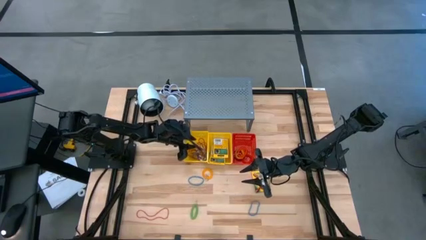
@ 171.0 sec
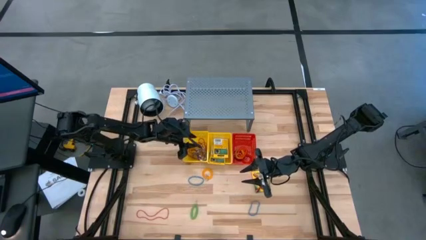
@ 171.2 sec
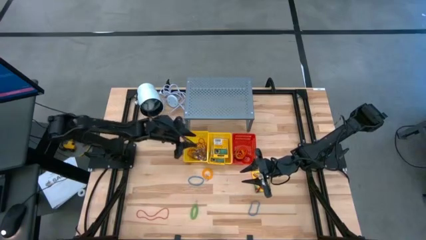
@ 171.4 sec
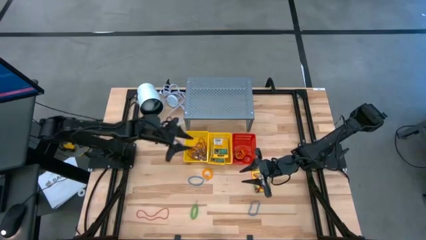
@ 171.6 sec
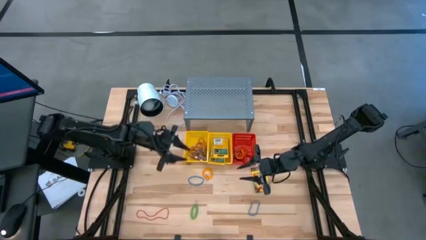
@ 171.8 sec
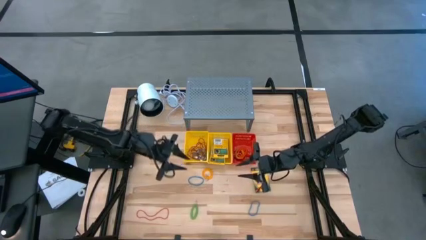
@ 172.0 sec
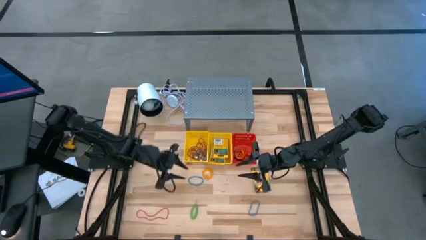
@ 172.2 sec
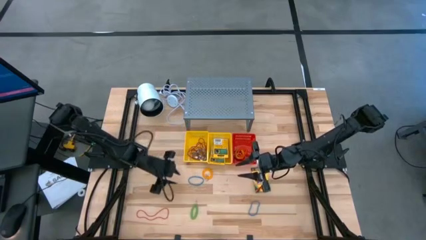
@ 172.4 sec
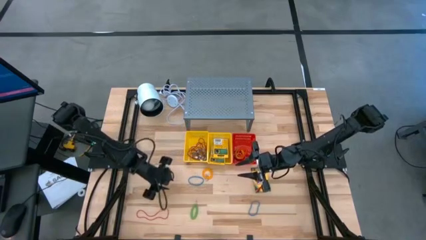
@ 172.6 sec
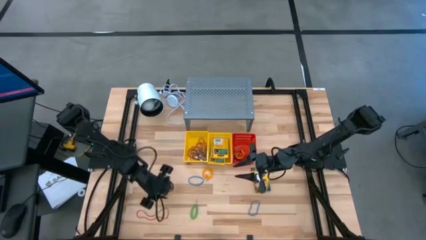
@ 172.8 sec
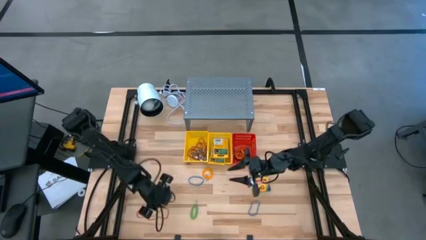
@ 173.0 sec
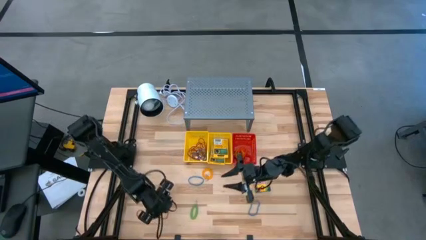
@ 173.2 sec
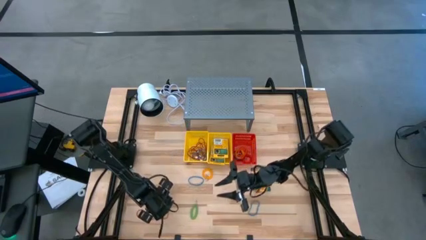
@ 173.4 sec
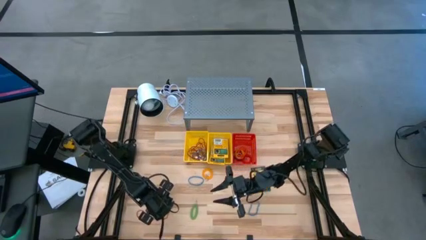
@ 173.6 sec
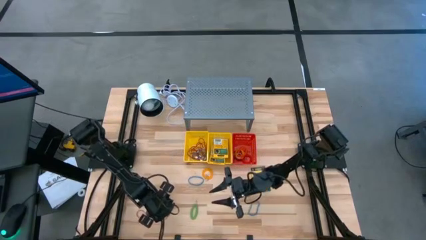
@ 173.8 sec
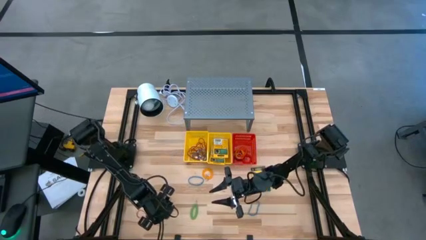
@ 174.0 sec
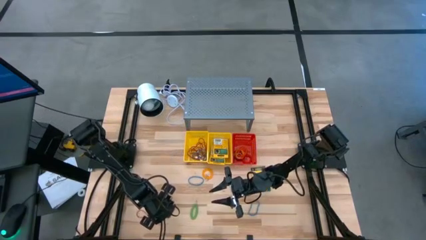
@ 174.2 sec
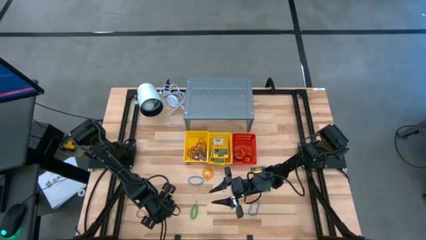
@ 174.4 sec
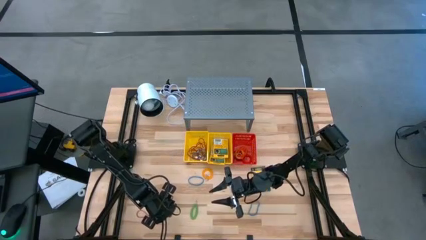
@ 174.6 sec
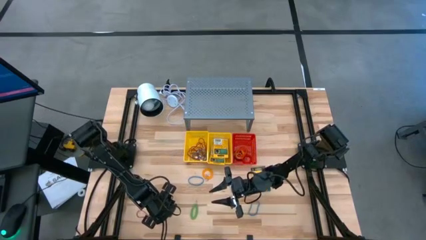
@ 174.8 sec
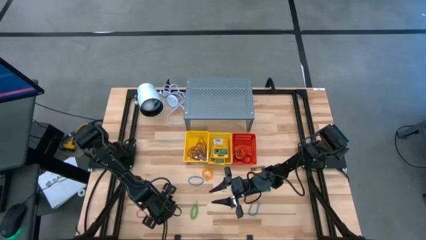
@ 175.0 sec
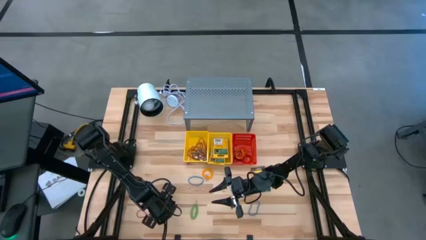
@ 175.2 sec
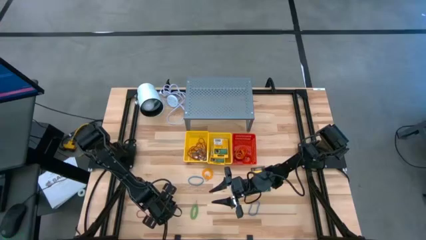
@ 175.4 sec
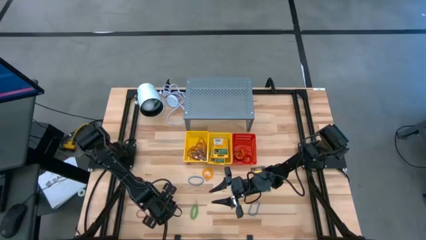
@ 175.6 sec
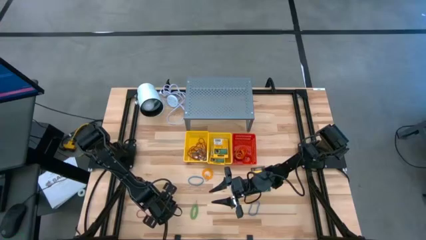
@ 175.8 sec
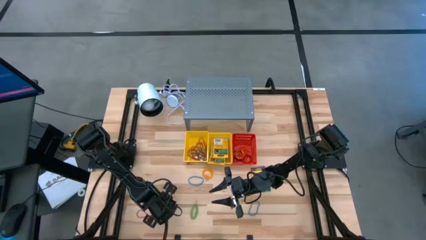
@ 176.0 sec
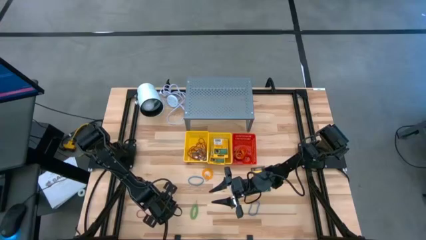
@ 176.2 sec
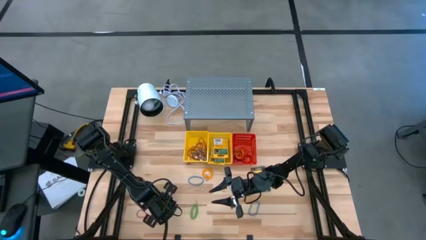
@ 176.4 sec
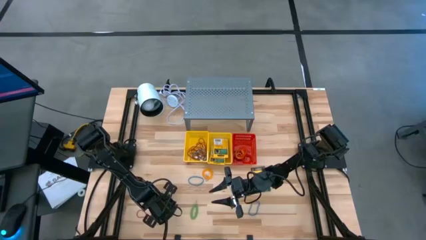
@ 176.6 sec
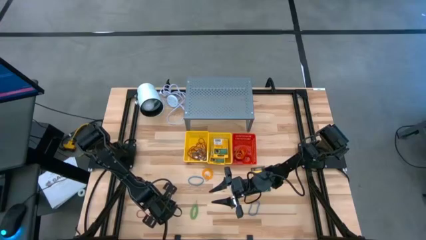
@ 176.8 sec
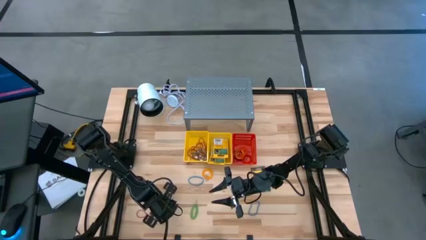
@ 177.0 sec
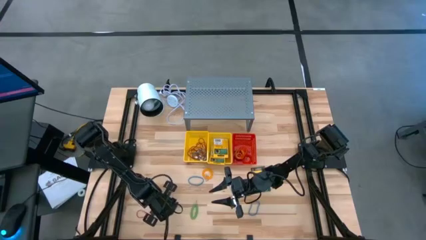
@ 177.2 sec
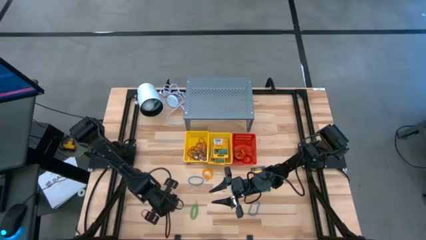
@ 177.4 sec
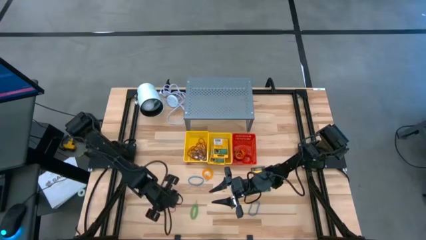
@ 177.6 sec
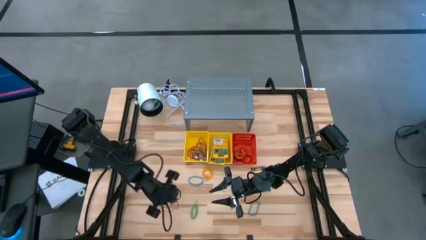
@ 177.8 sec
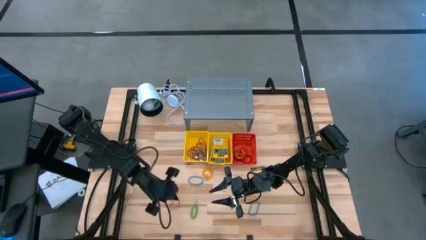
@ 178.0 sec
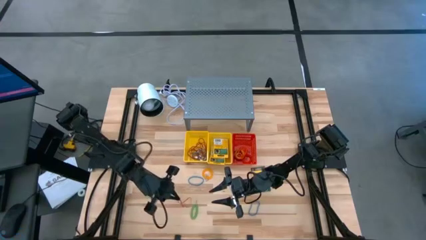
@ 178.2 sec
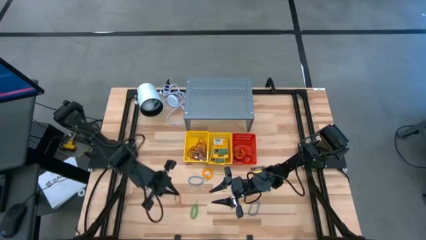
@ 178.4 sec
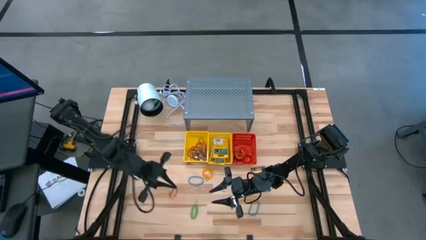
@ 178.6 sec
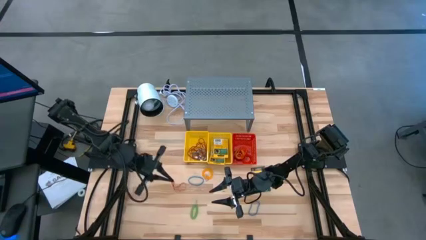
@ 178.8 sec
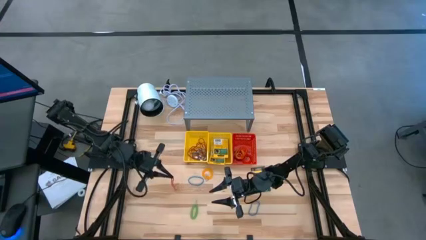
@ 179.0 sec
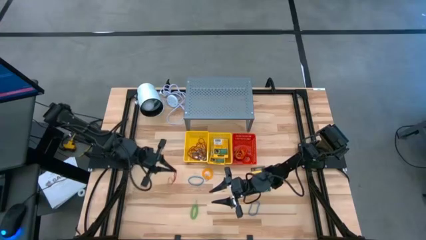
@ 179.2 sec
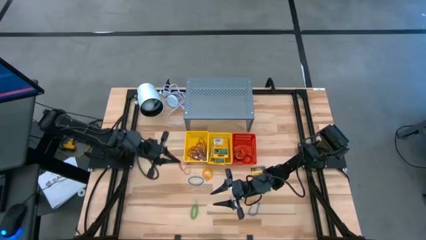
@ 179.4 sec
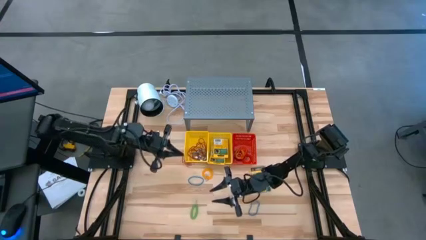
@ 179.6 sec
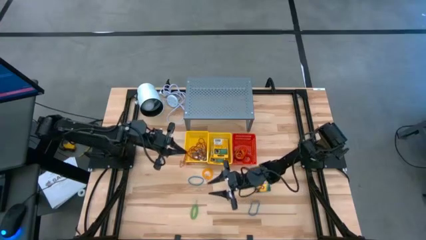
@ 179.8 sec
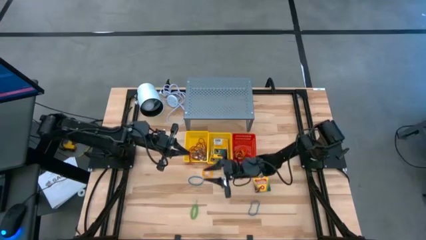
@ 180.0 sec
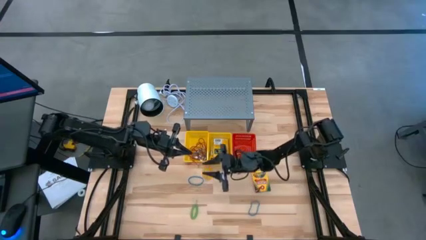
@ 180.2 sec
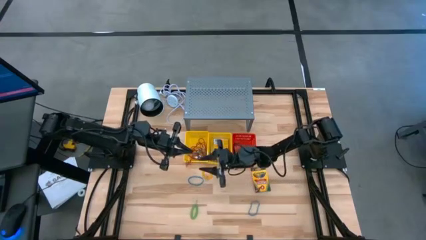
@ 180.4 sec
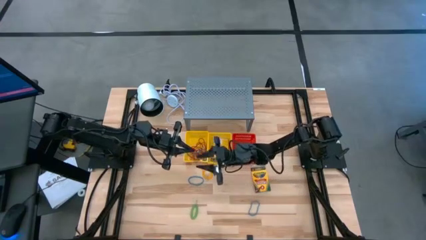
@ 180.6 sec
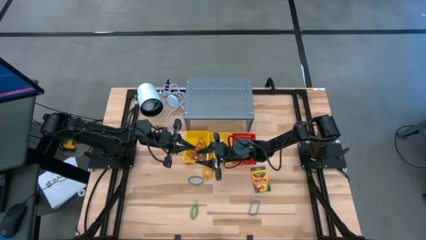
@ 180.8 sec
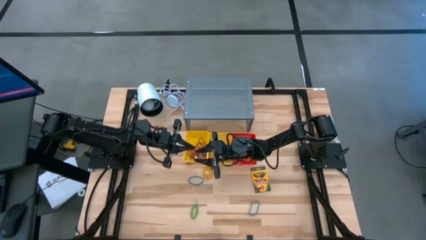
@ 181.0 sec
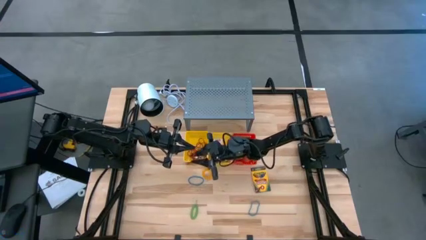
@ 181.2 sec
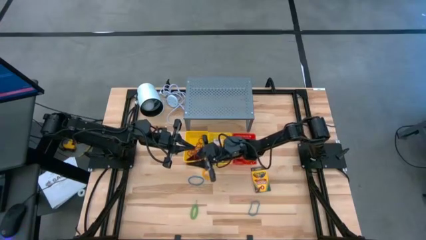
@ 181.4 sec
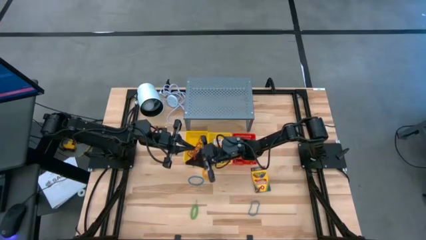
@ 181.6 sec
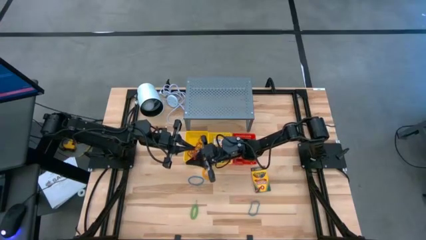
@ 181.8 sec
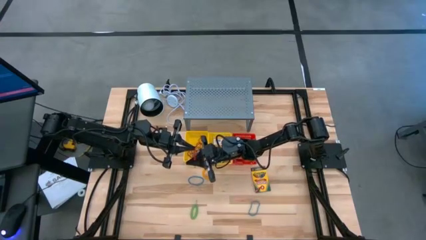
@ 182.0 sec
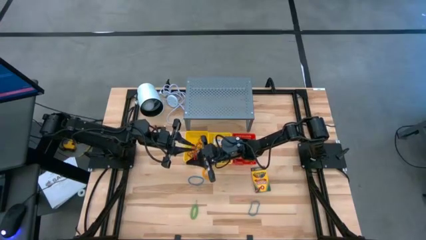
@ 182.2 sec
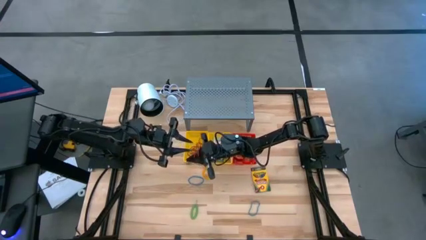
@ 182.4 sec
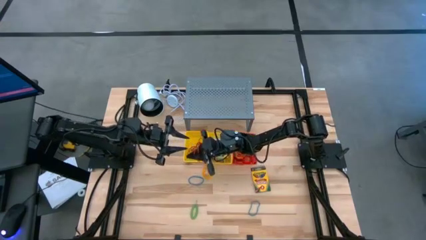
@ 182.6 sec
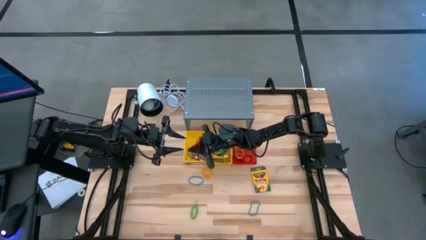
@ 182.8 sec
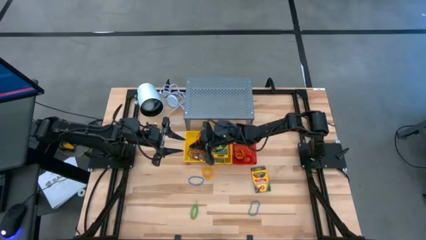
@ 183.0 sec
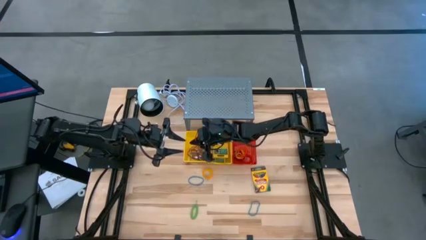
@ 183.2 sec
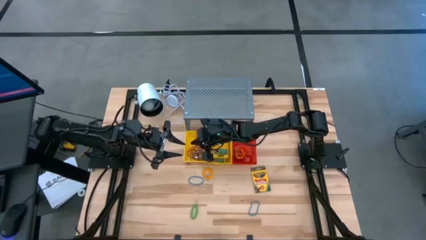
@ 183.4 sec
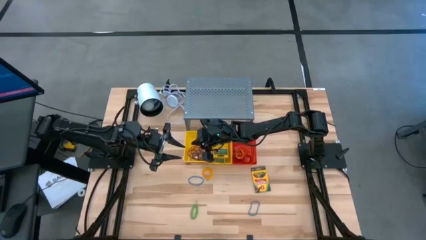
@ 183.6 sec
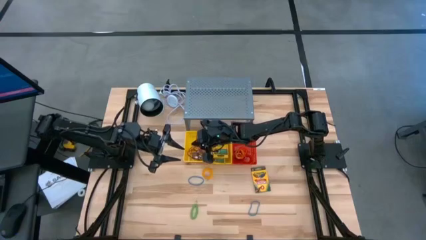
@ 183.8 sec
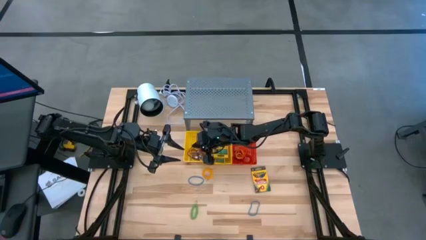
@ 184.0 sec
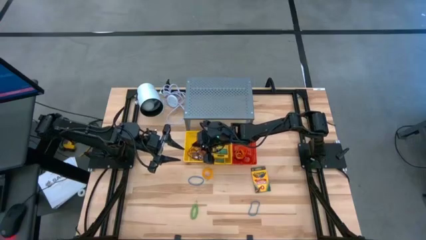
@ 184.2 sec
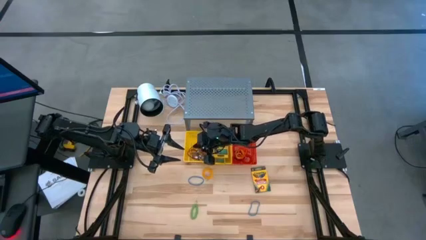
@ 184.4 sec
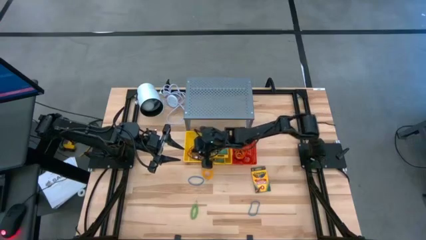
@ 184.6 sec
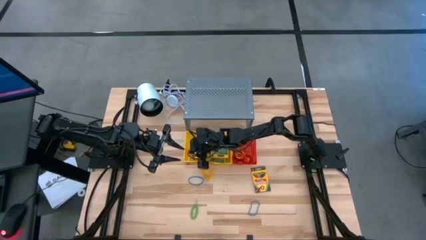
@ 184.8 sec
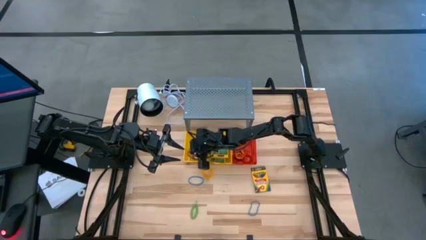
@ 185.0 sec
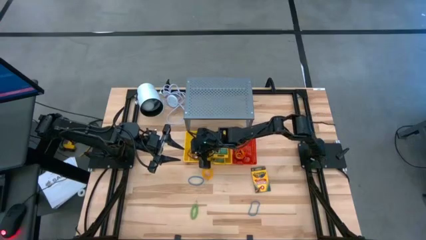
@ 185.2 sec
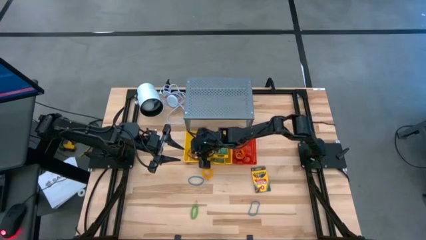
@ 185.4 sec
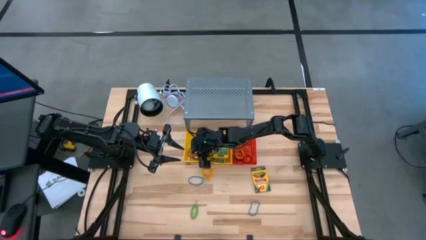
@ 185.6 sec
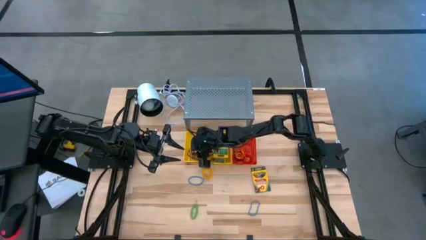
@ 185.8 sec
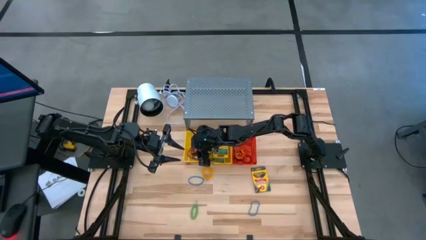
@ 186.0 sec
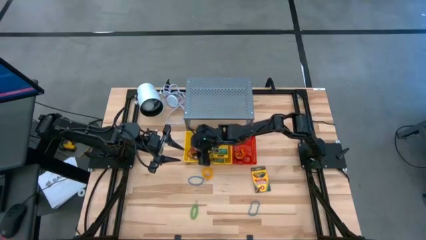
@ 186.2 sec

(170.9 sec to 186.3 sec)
Task: Pick & Place Office Desk Supplies
Put the red rubber band into the left yellow basket
